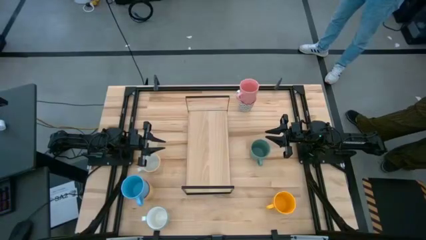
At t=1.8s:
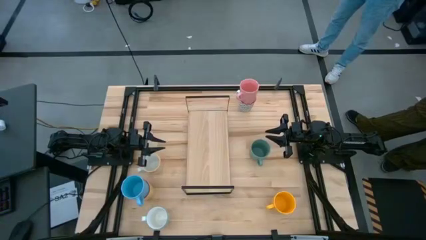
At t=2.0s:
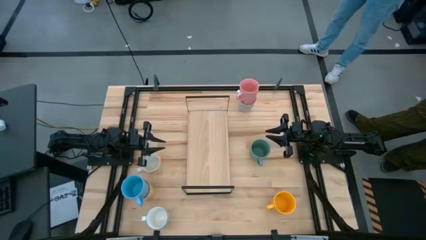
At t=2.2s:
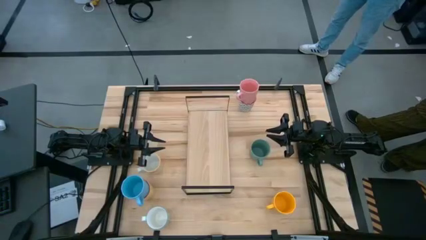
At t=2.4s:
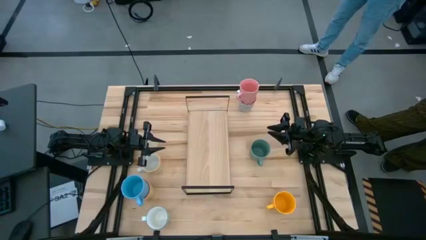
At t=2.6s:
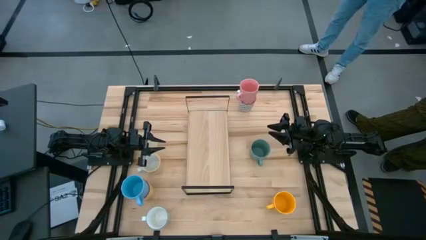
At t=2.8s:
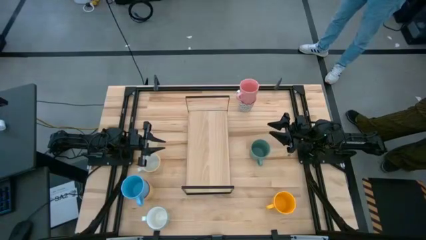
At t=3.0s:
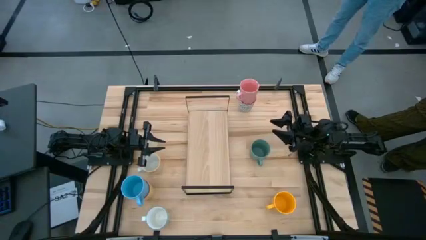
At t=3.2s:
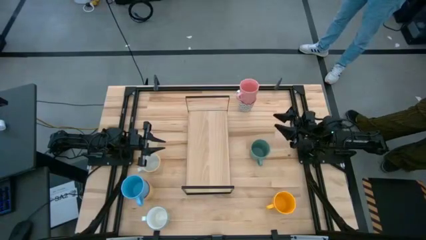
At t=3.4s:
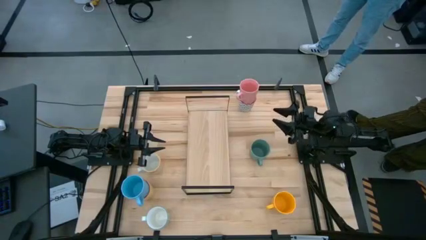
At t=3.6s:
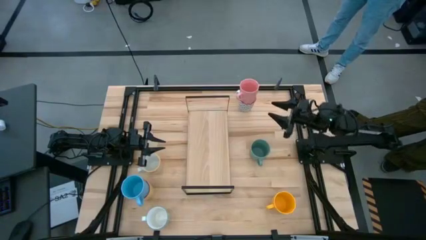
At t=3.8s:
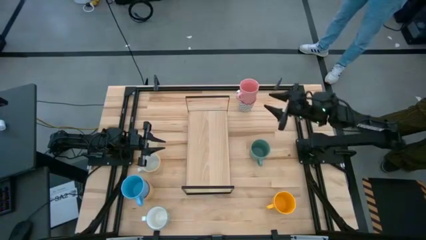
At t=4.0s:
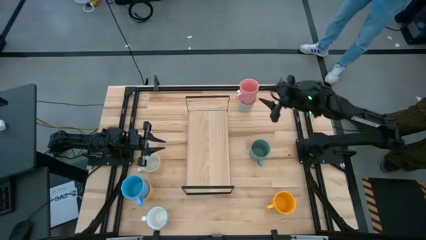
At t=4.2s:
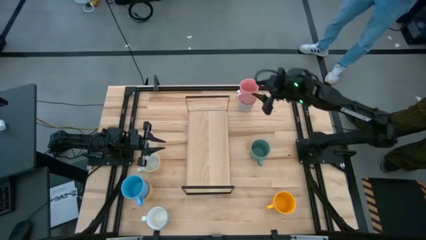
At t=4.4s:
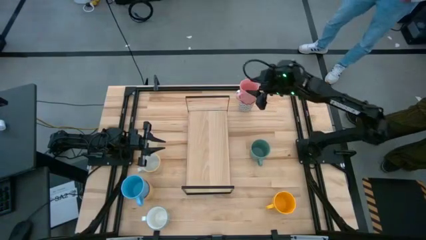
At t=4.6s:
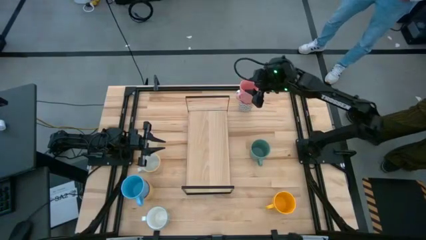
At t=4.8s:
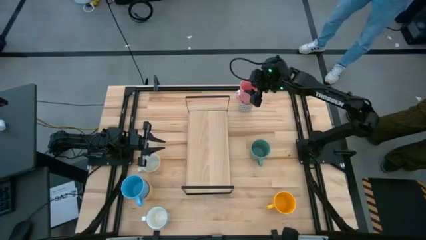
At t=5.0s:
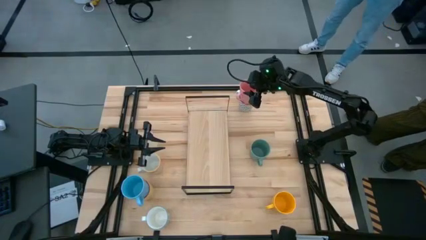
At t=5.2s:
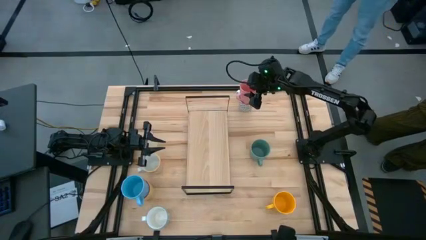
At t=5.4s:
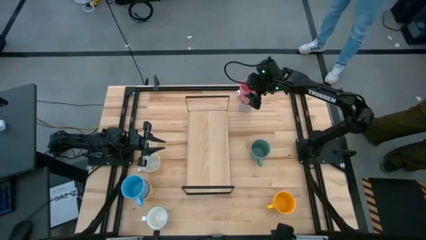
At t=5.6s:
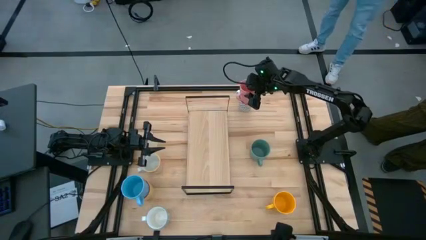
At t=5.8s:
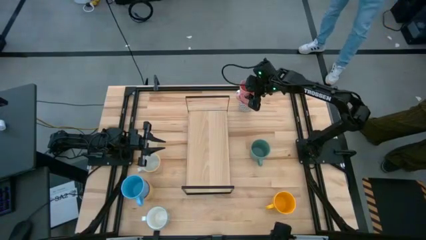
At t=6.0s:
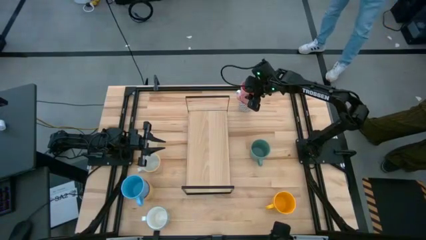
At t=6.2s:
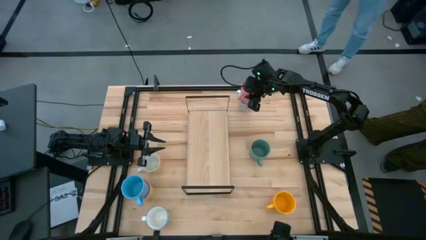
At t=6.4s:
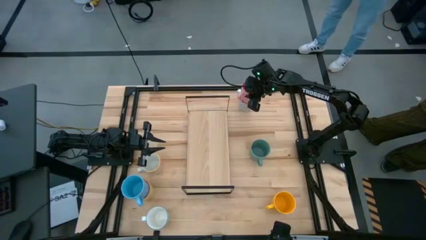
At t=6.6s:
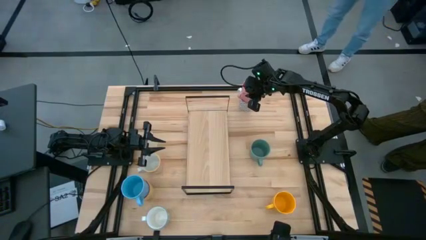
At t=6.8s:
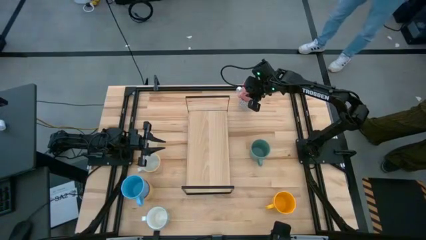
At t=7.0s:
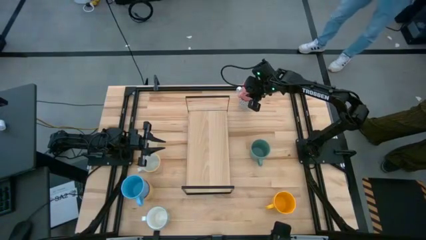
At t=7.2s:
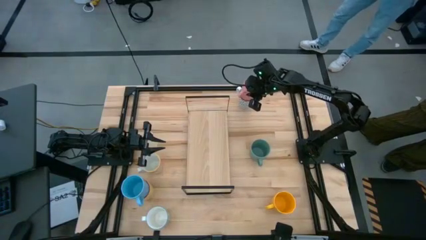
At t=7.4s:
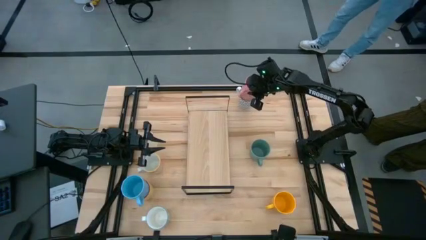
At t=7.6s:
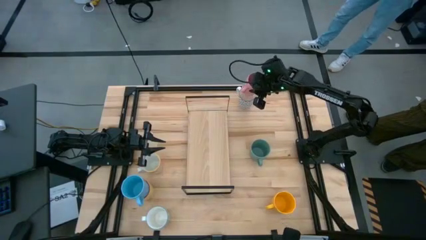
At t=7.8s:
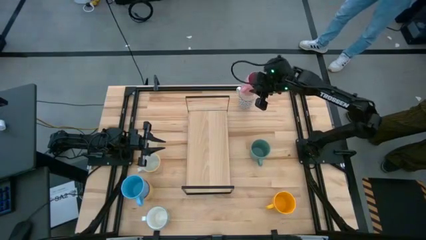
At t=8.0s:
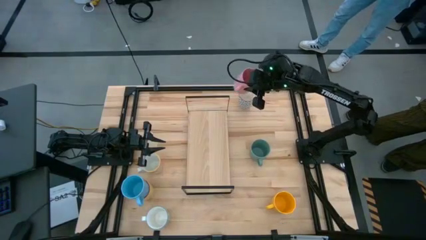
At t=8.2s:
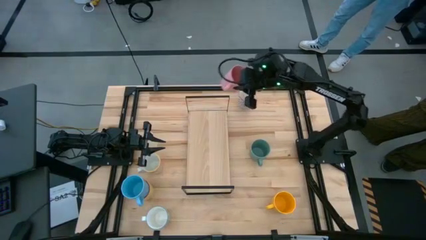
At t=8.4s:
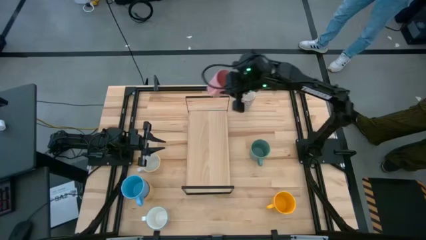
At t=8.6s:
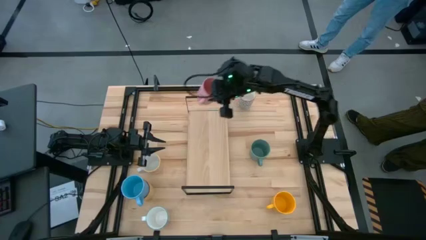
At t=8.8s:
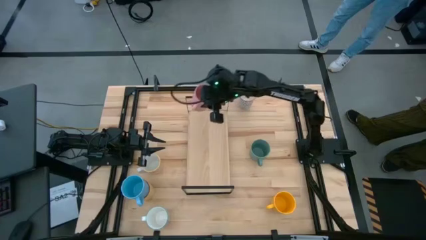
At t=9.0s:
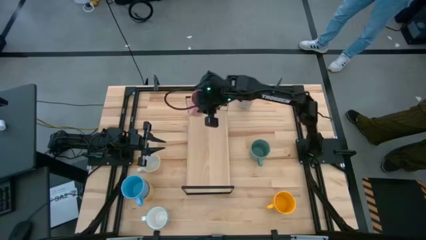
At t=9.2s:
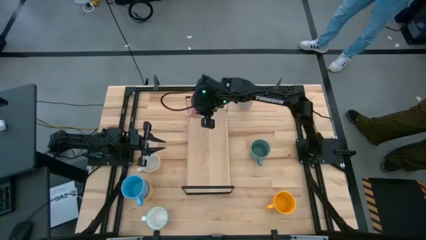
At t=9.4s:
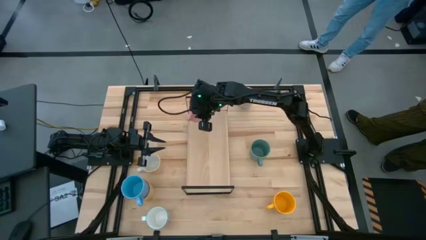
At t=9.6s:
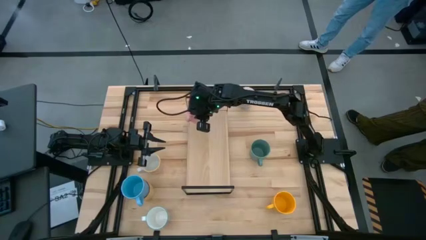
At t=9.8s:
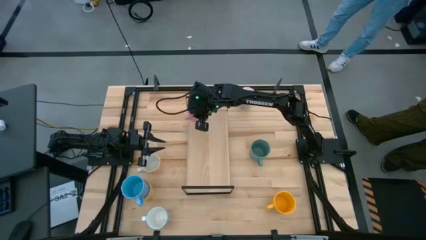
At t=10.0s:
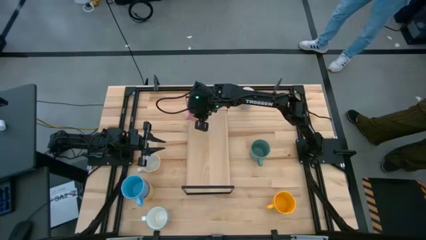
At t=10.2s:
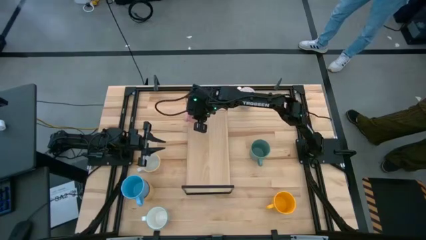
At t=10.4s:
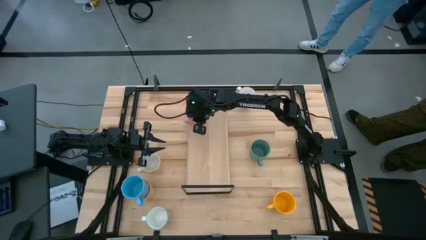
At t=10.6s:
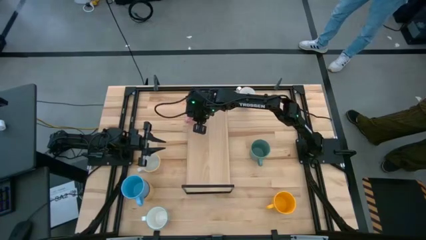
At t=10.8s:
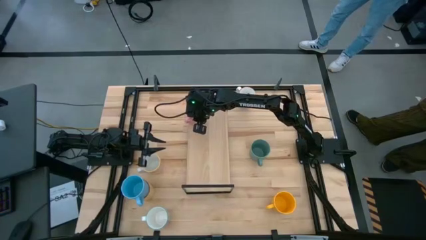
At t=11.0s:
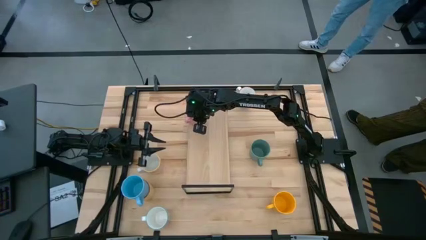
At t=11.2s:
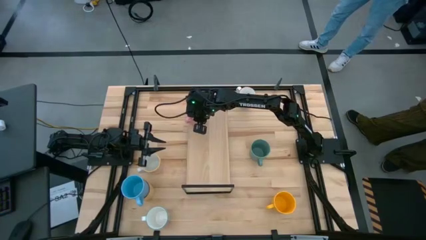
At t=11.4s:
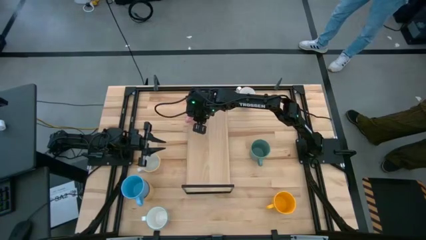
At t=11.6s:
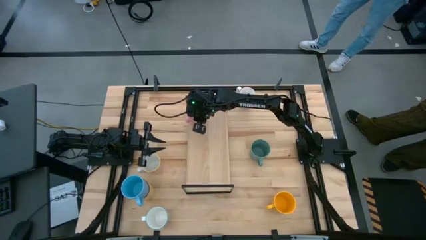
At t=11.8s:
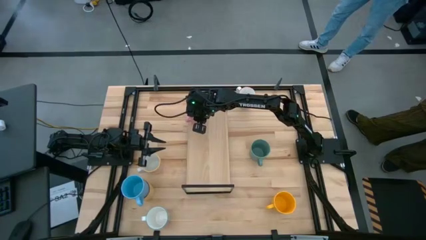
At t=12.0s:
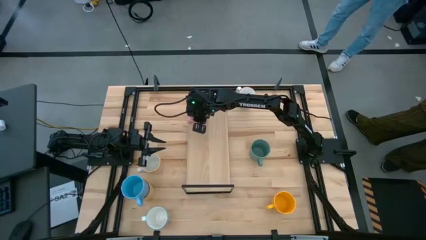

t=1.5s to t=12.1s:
Task: Place coffee mugs
Put the pink mug on the shelf

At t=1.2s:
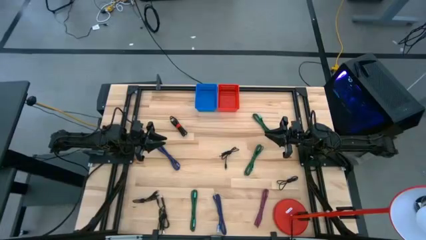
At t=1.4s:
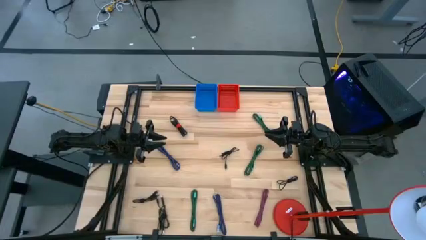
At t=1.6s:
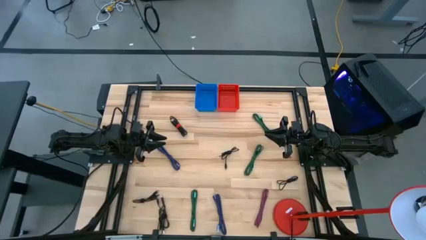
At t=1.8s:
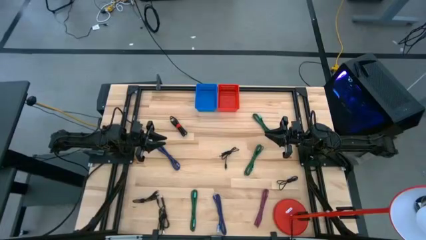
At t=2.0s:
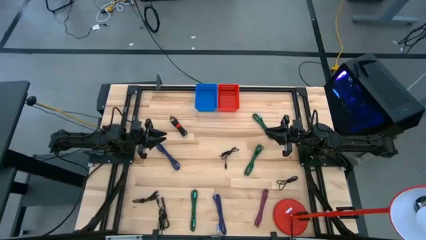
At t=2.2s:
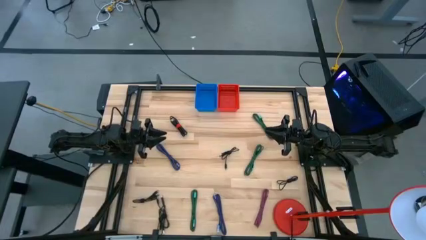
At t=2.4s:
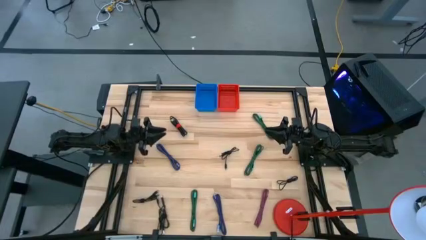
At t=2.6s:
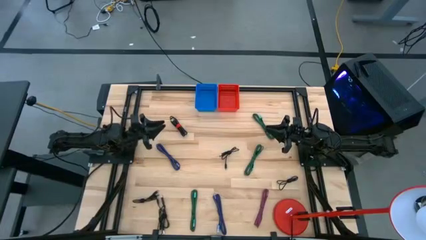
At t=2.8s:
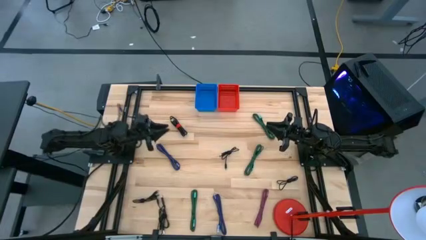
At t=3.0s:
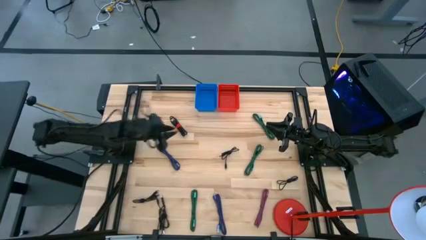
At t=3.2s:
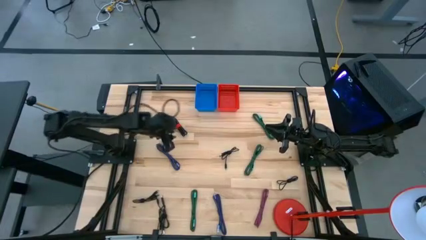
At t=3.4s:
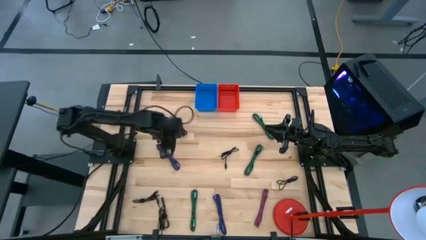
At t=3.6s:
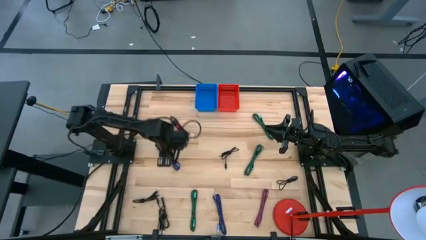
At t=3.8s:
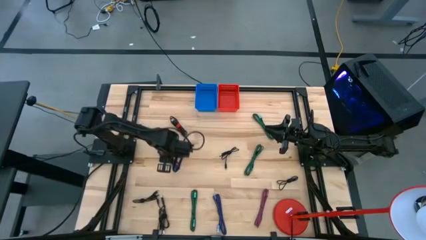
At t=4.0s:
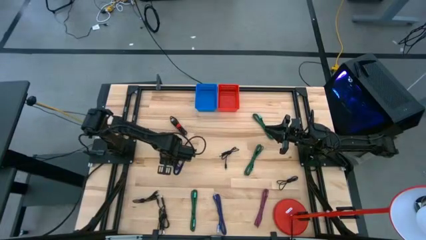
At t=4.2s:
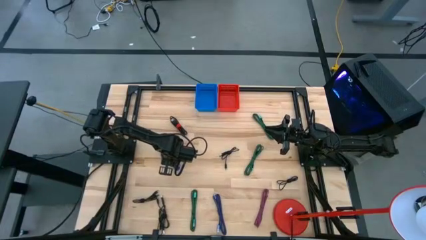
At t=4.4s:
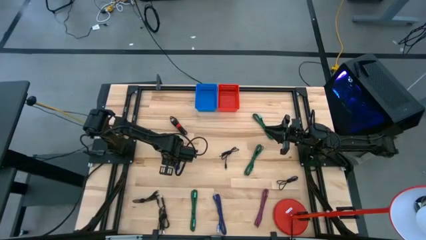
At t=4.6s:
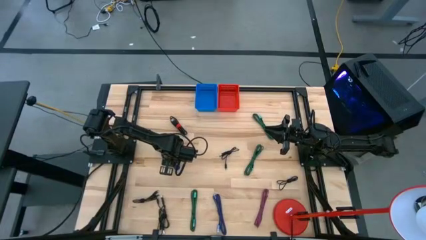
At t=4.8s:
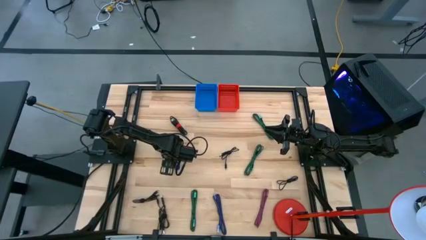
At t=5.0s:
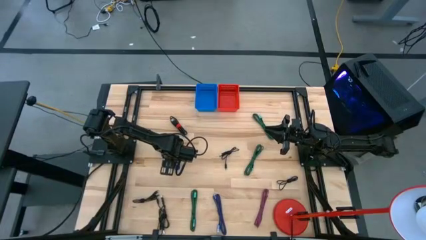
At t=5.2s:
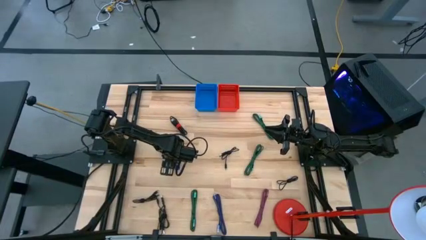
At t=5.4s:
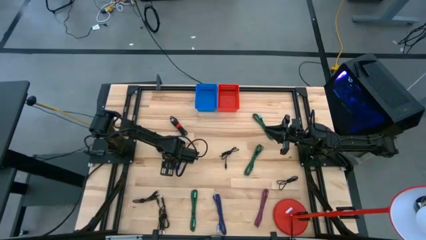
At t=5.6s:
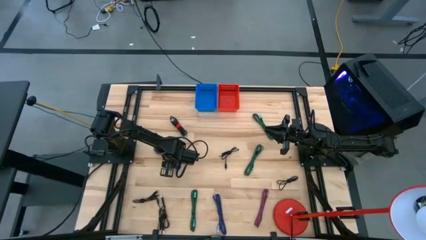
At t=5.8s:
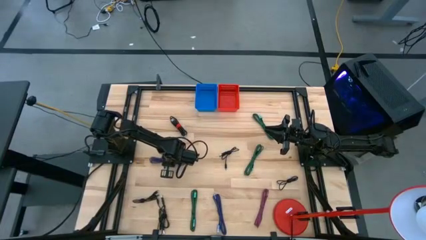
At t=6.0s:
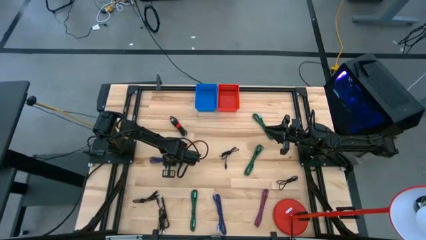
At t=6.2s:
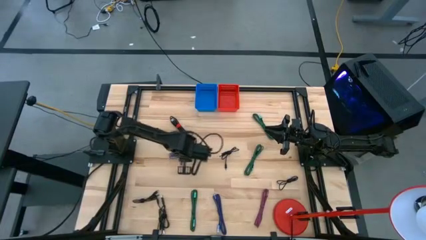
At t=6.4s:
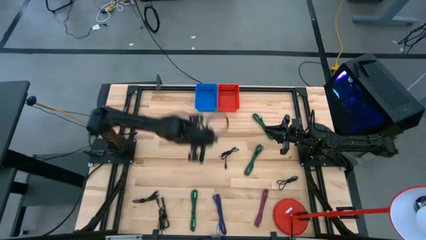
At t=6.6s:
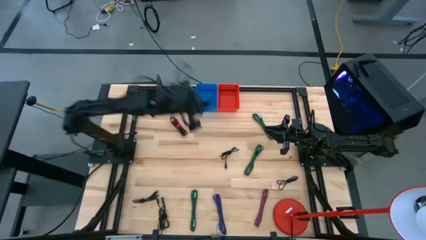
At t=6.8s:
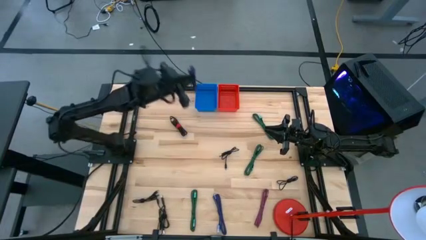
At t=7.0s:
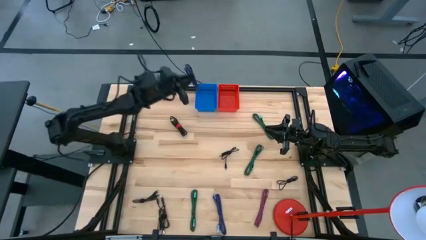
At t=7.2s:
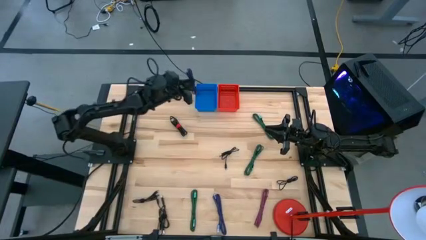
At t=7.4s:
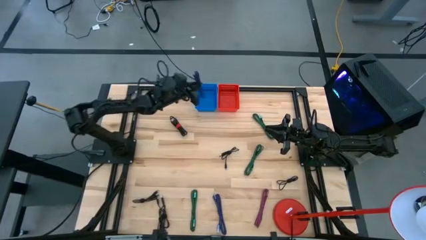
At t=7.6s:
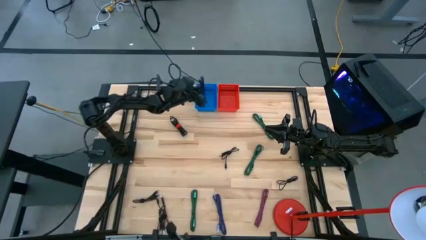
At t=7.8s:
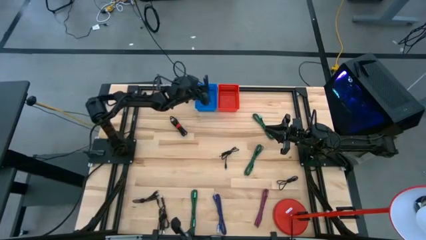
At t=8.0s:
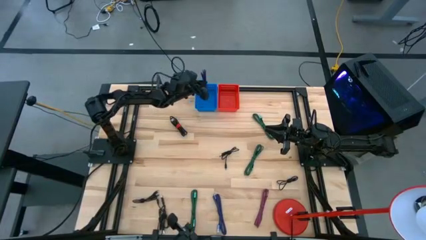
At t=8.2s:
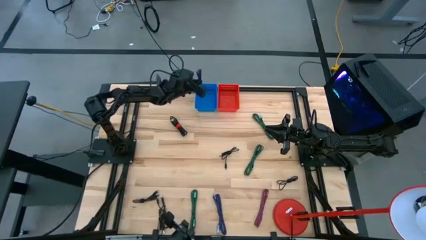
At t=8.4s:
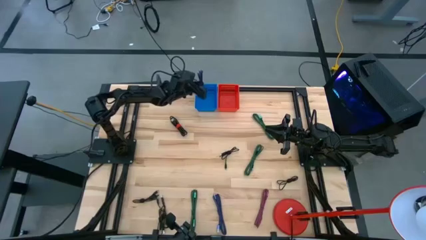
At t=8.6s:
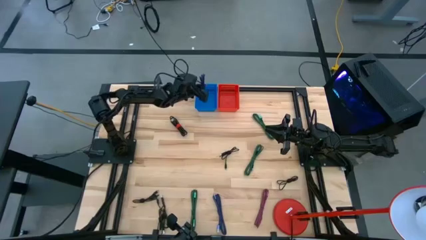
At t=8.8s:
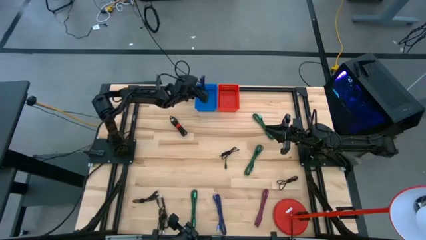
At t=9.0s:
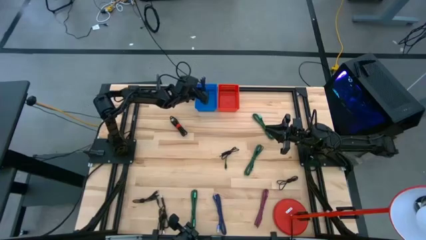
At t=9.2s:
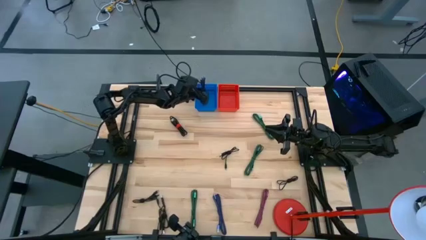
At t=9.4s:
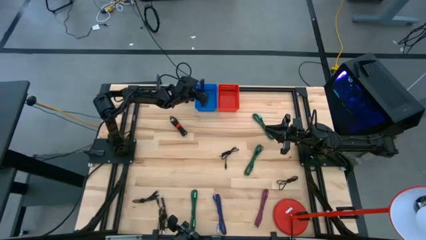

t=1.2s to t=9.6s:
Task: Pick & Place USB Port
Put the violet charger cable into the blue bin
